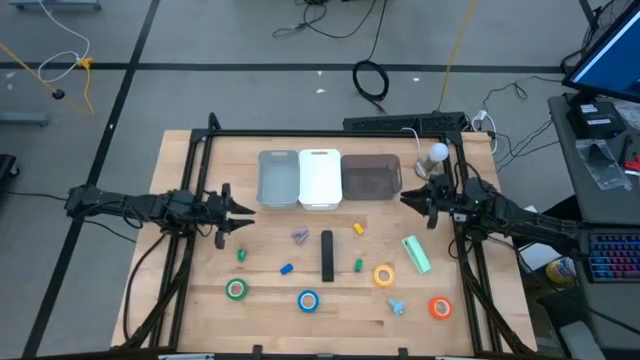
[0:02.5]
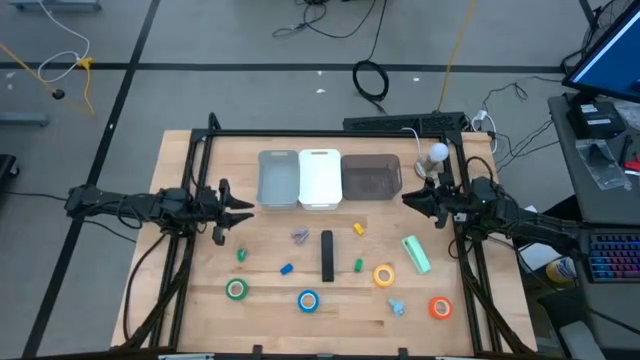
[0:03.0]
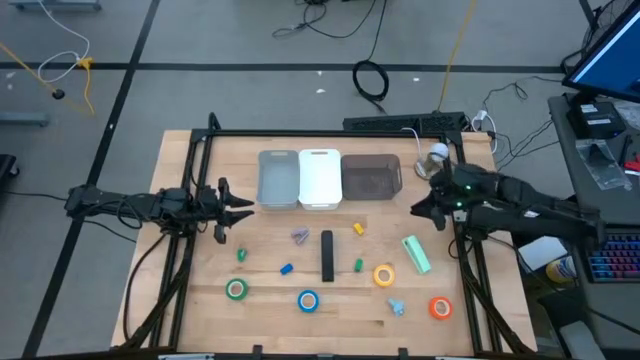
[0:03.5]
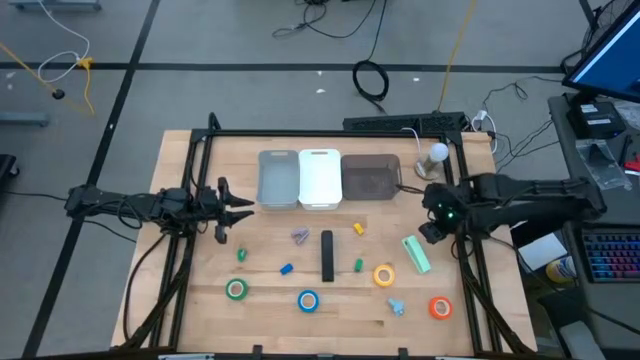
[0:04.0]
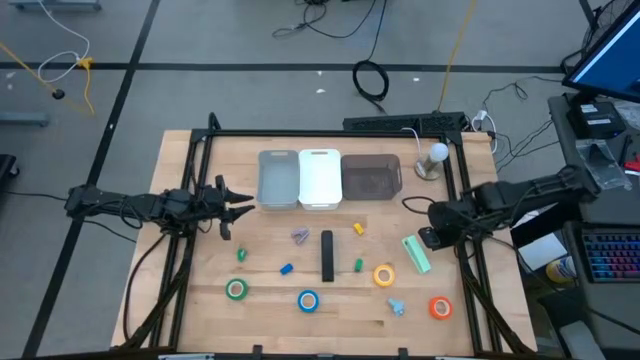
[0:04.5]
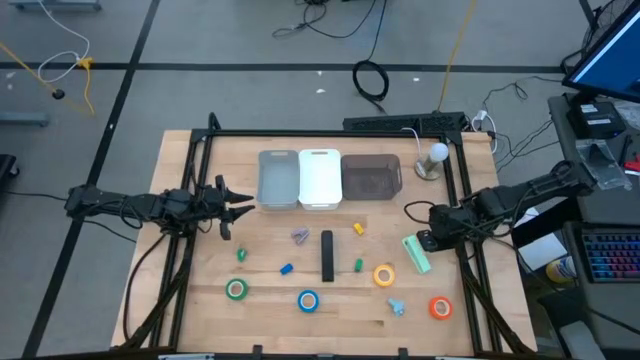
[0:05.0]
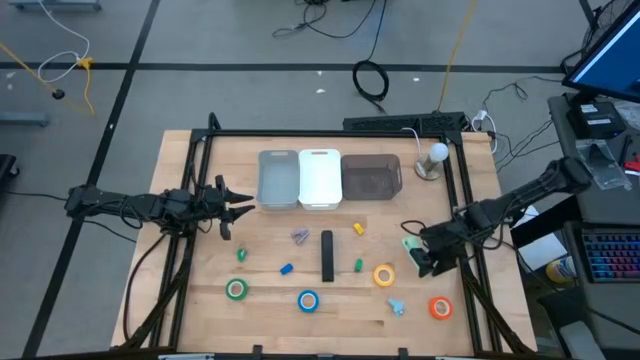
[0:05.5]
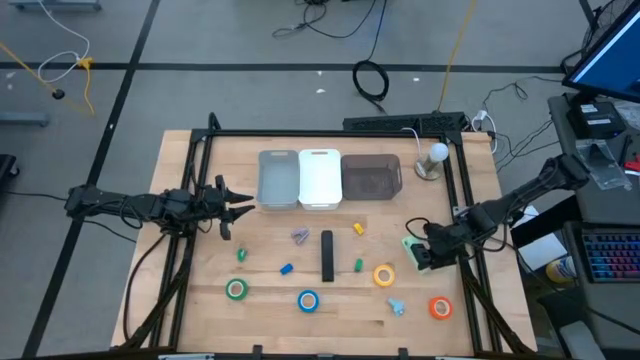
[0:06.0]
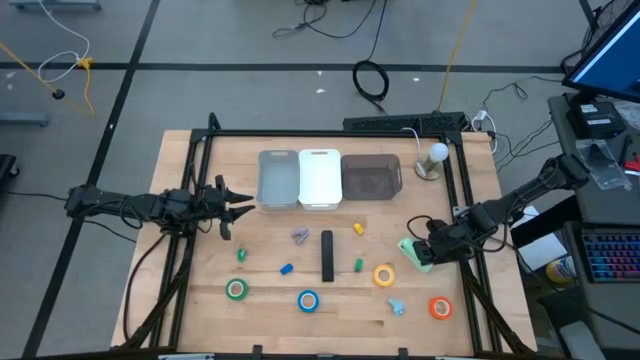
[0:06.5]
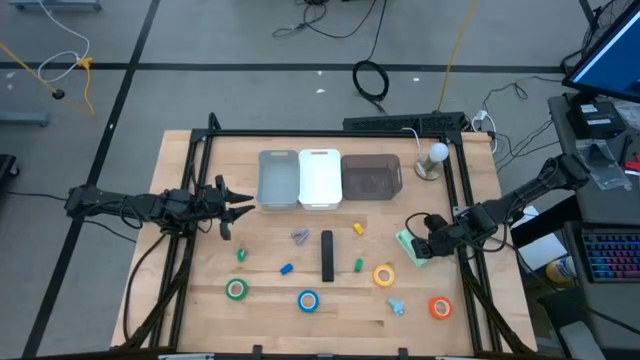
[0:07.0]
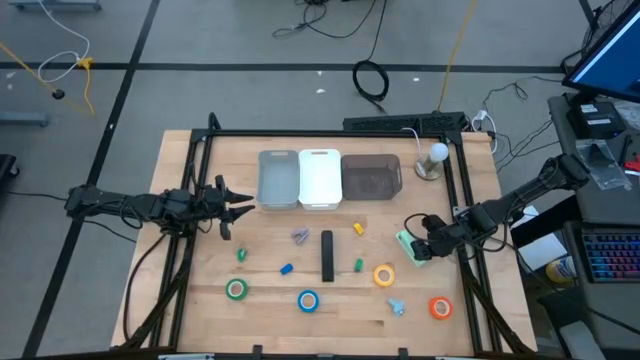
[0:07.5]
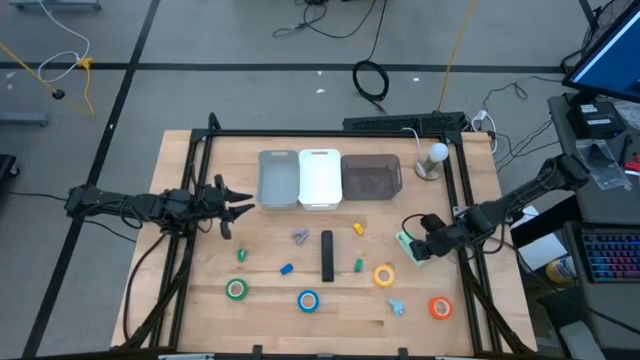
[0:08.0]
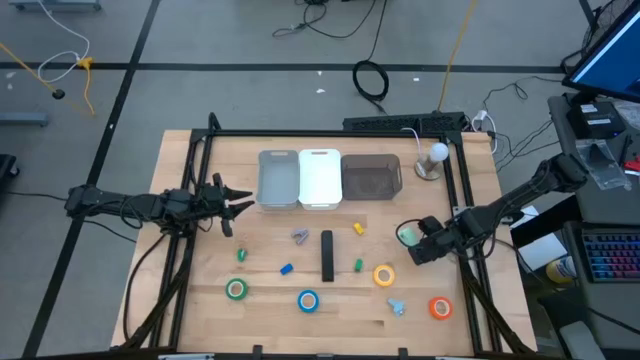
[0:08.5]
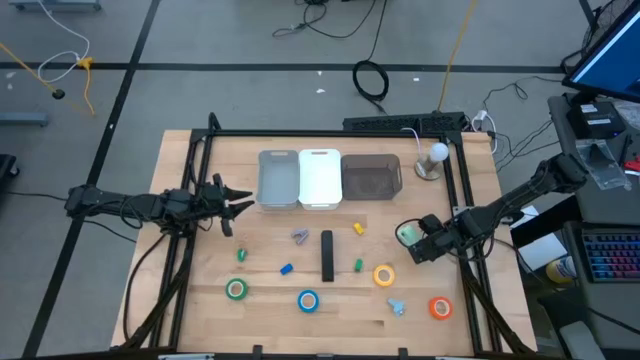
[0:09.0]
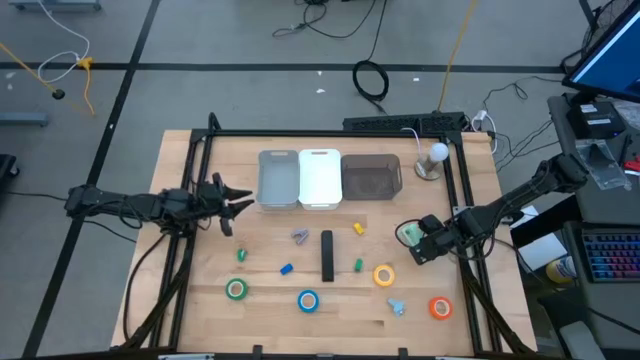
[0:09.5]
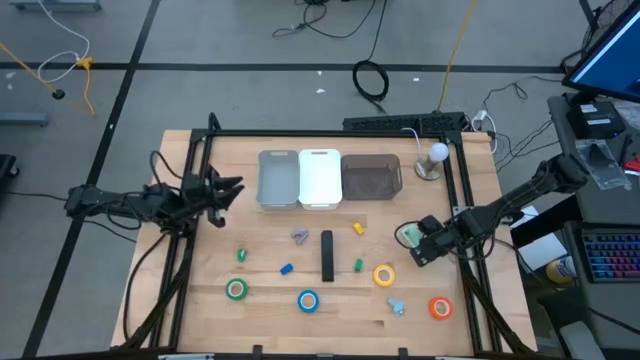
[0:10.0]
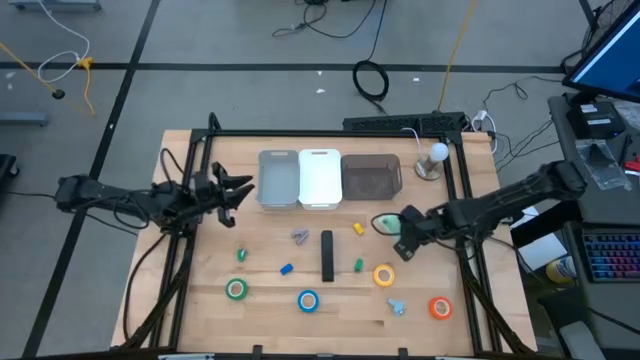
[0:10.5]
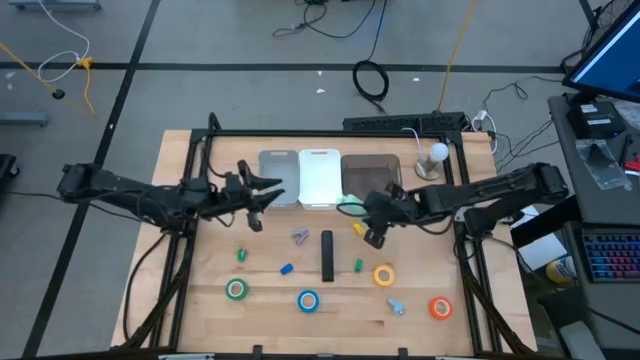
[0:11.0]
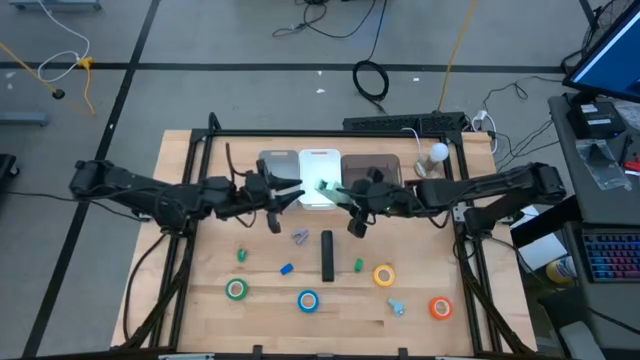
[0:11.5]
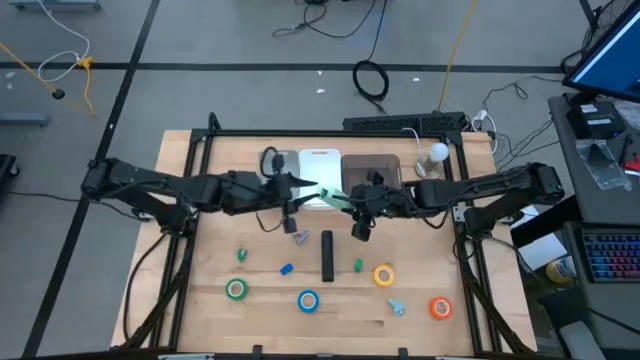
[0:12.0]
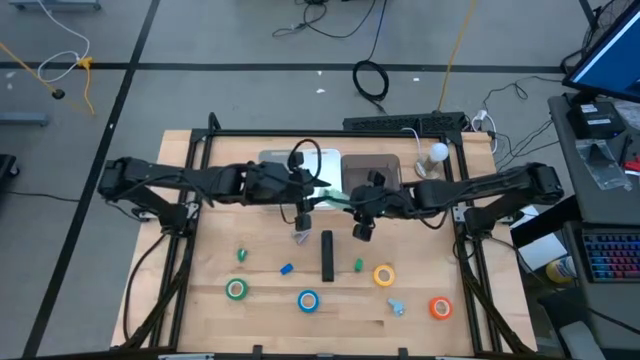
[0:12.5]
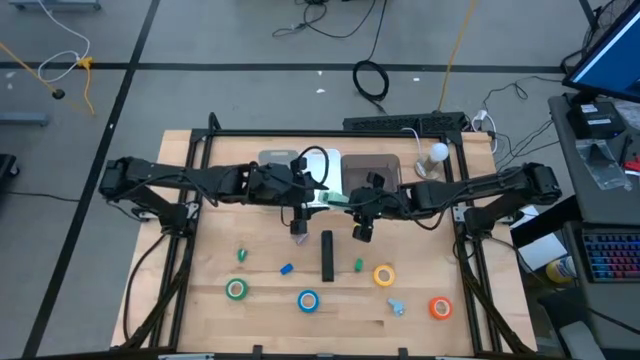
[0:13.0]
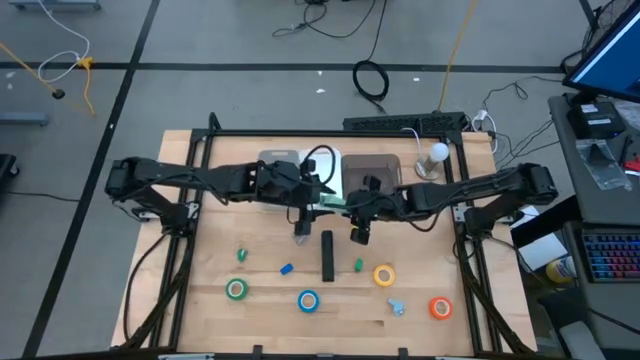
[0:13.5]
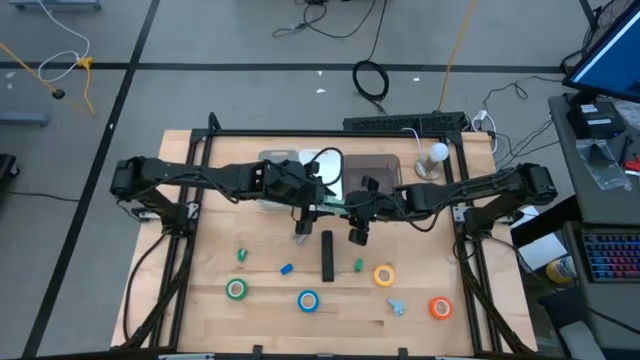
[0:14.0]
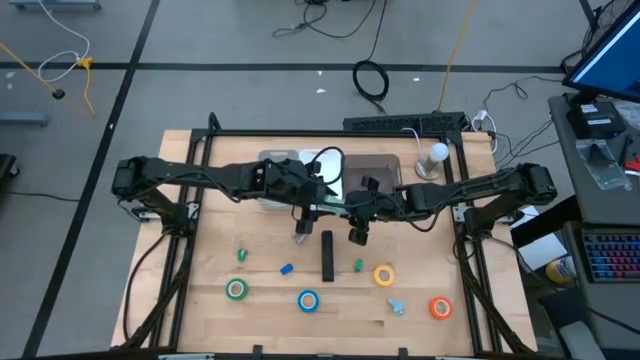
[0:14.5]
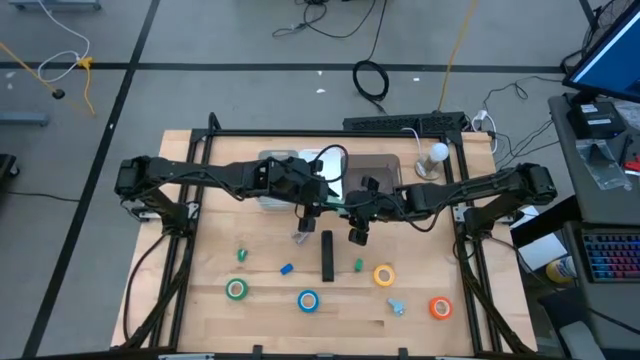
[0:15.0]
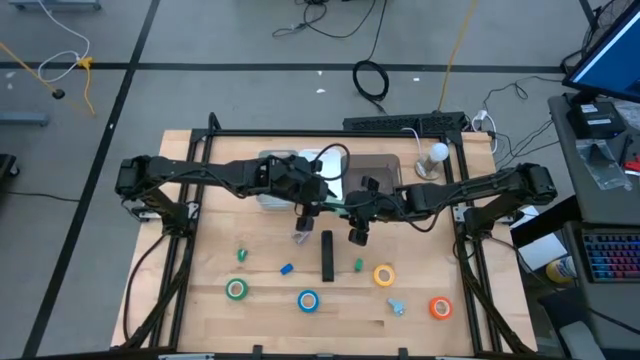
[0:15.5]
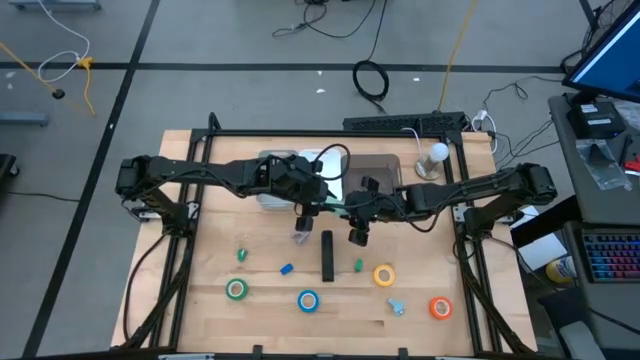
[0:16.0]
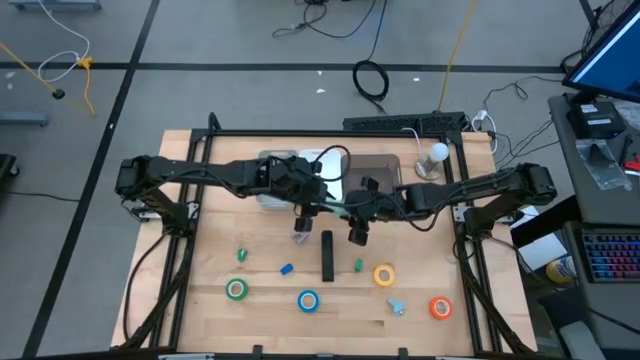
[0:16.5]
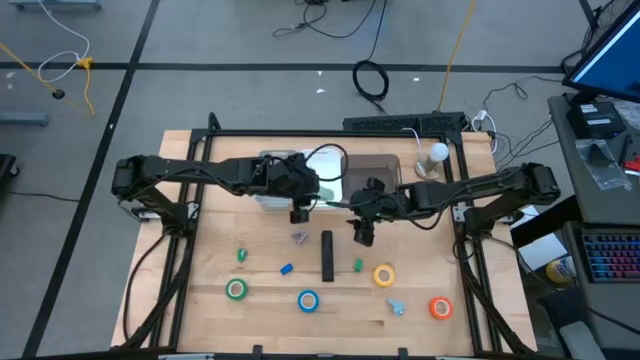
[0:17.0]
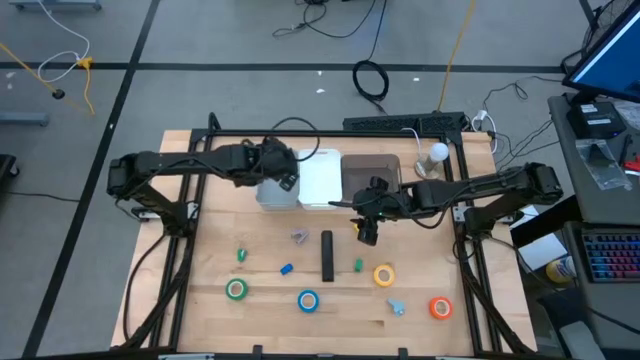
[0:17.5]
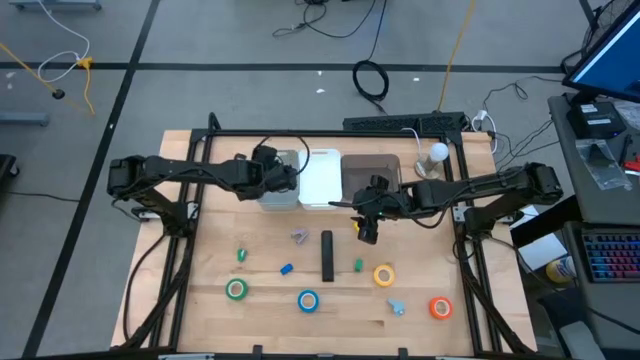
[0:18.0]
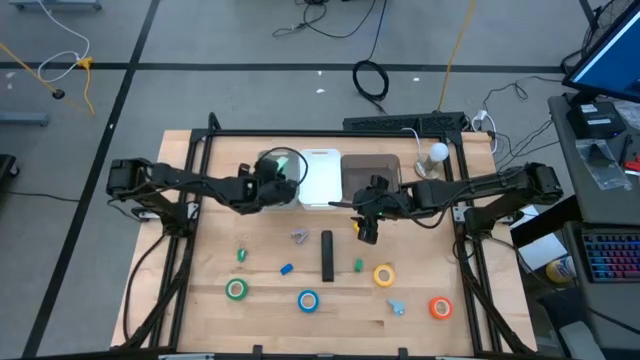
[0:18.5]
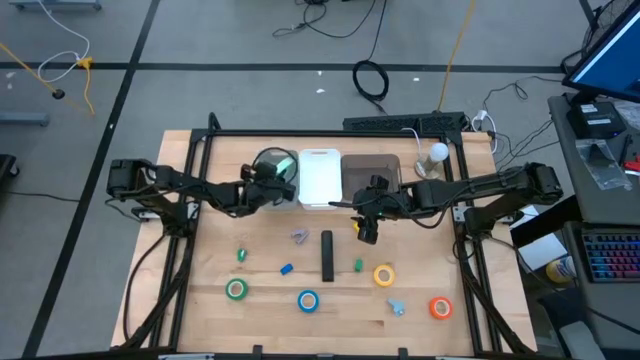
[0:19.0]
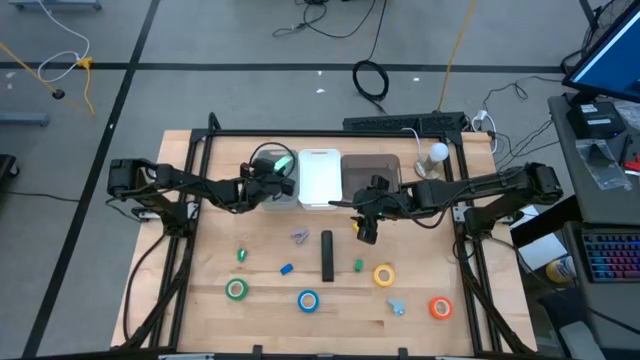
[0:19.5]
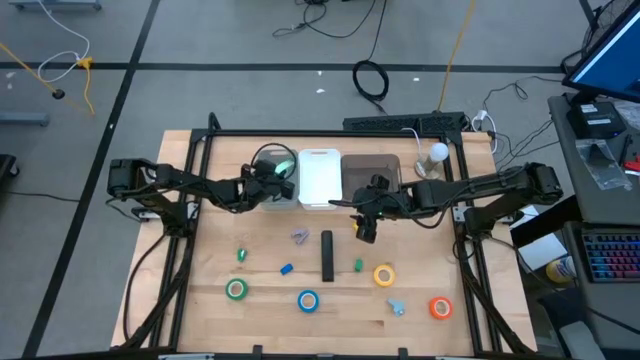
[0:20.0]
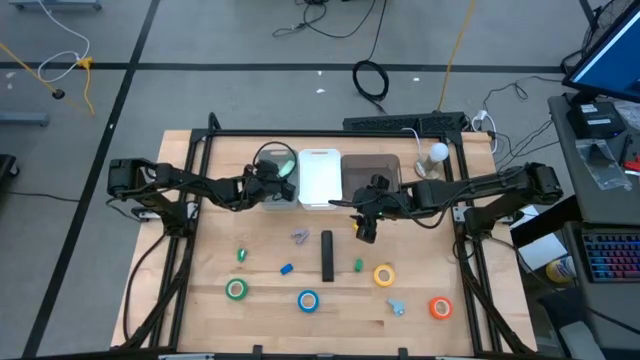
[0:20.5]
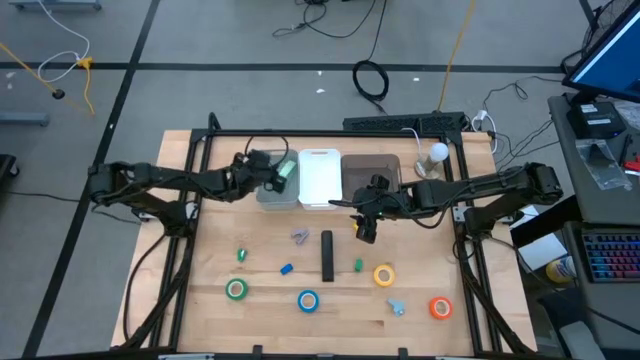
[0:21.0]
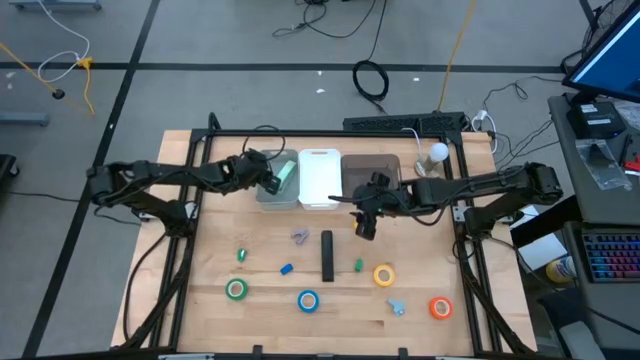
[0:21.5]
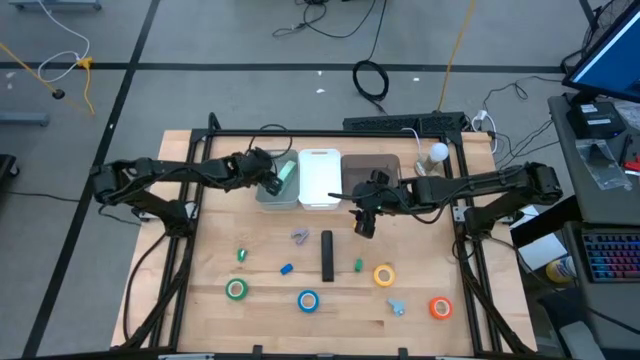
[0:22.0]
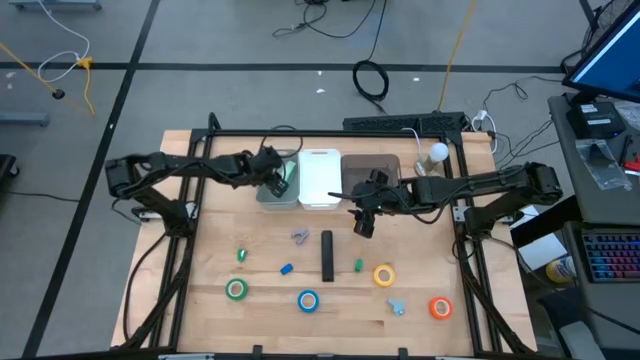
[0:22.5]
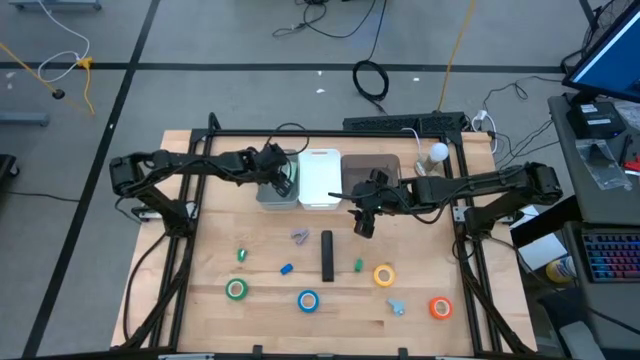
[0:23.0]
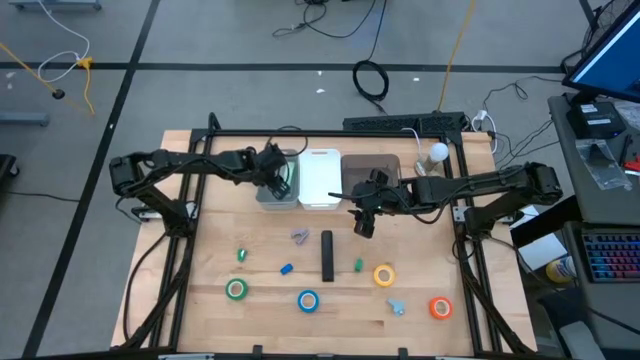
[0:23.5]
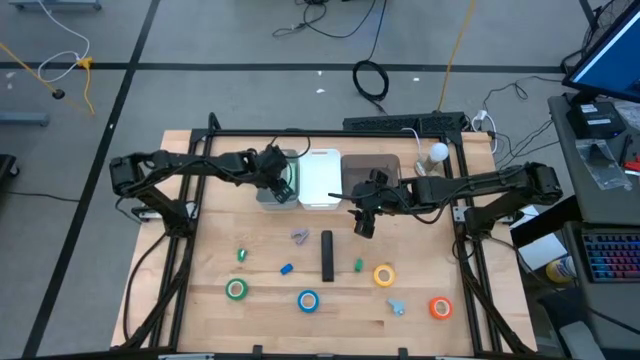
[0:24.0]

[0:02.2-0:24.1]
Task: Pick and place Stapler, Stapler remover, tape
Put the light green stapler into the gray bin
